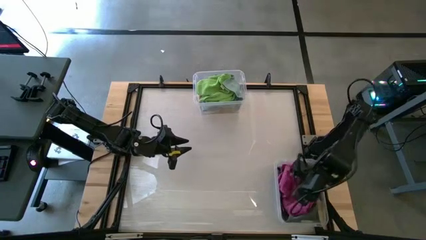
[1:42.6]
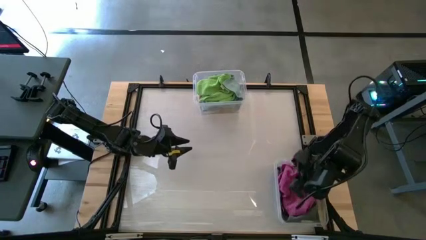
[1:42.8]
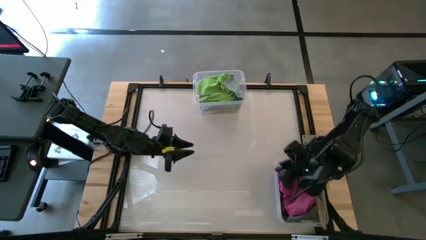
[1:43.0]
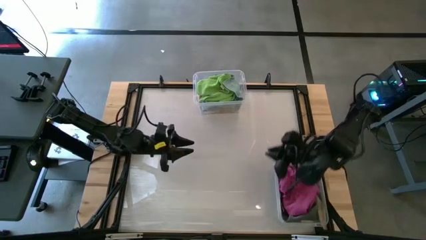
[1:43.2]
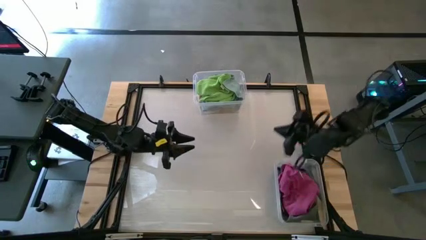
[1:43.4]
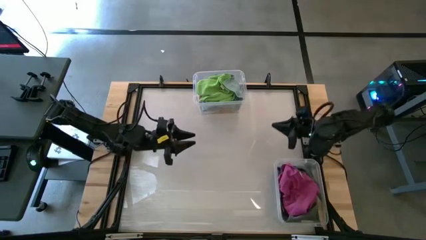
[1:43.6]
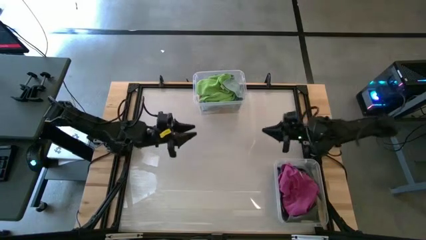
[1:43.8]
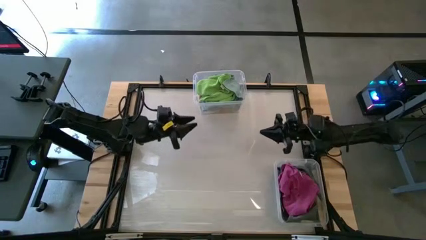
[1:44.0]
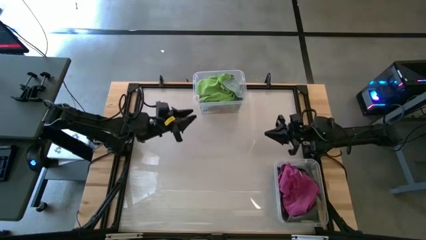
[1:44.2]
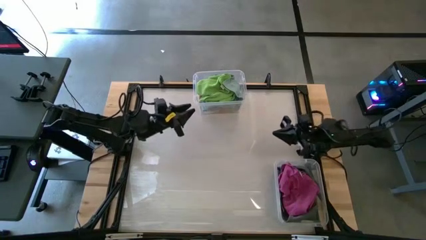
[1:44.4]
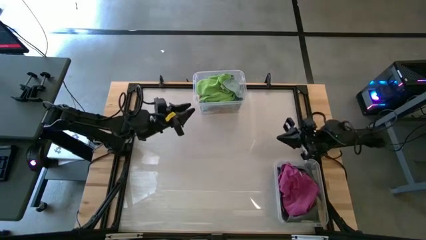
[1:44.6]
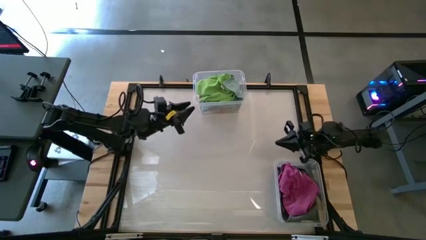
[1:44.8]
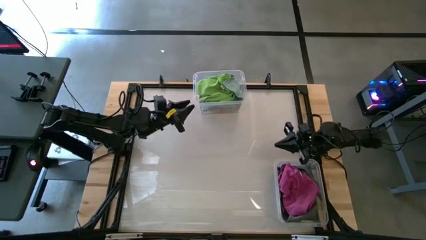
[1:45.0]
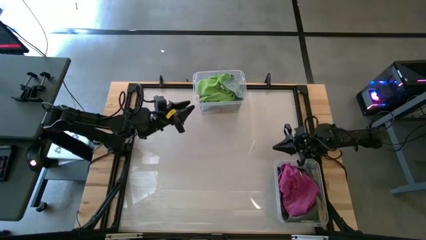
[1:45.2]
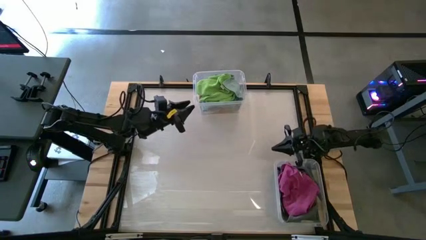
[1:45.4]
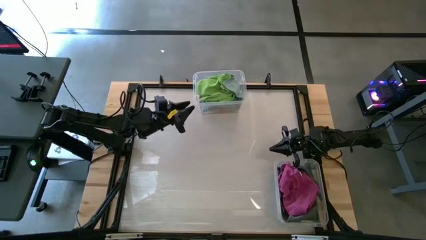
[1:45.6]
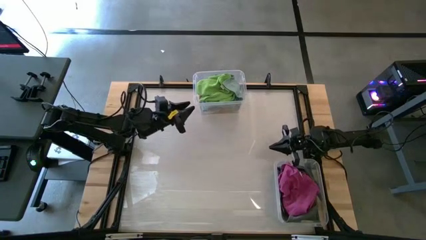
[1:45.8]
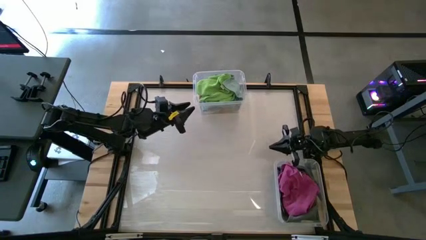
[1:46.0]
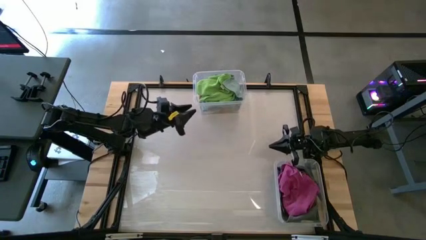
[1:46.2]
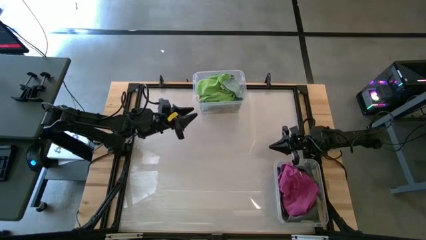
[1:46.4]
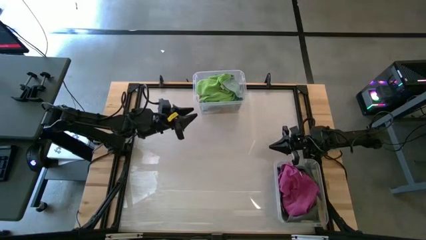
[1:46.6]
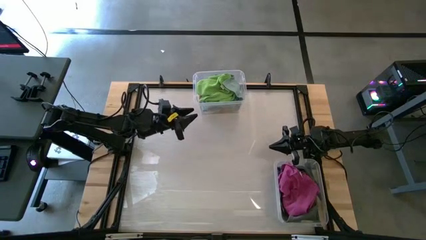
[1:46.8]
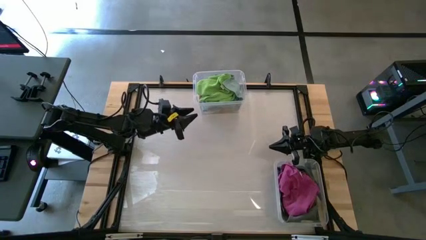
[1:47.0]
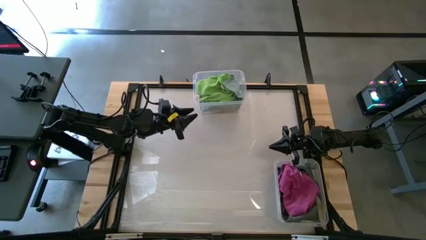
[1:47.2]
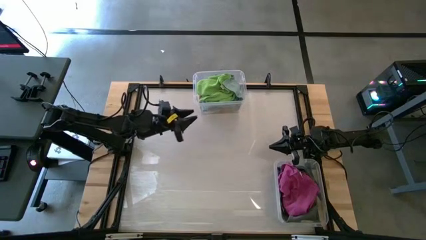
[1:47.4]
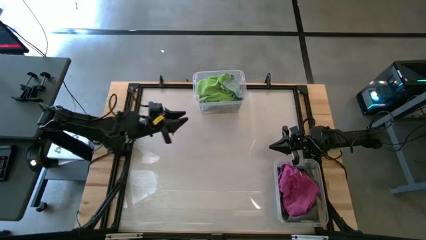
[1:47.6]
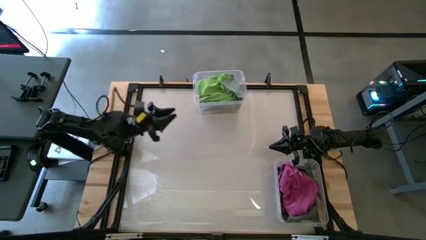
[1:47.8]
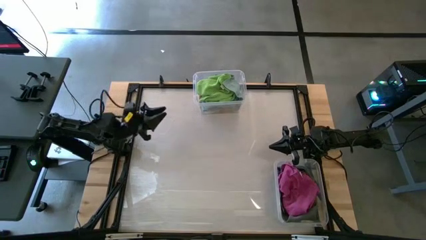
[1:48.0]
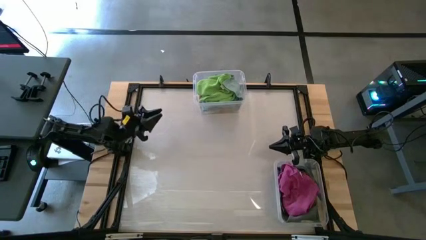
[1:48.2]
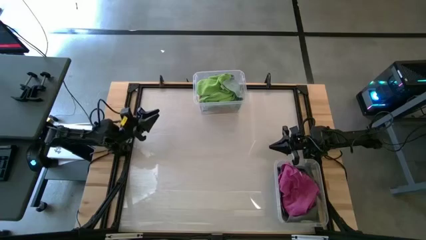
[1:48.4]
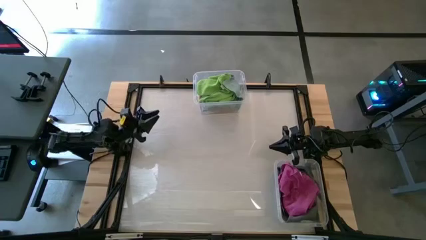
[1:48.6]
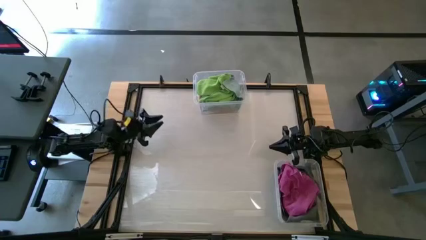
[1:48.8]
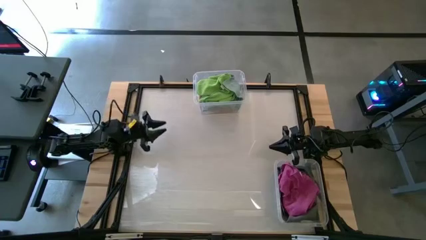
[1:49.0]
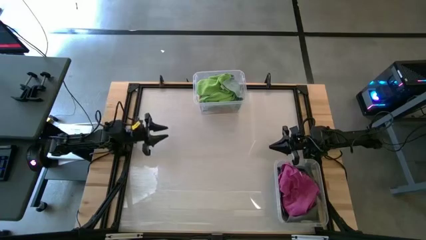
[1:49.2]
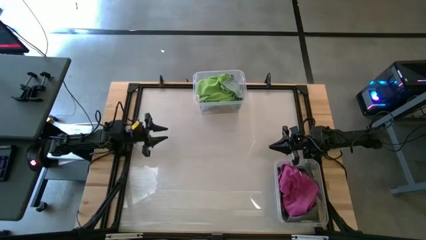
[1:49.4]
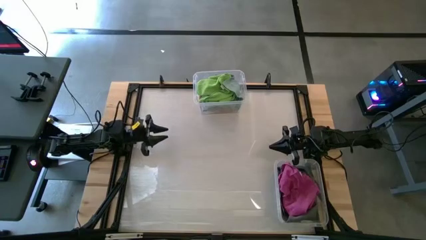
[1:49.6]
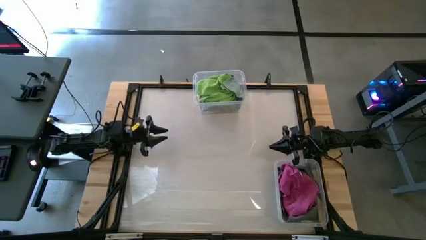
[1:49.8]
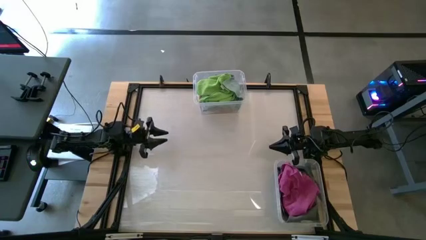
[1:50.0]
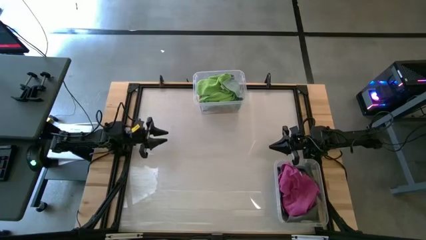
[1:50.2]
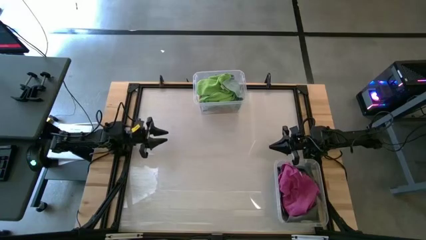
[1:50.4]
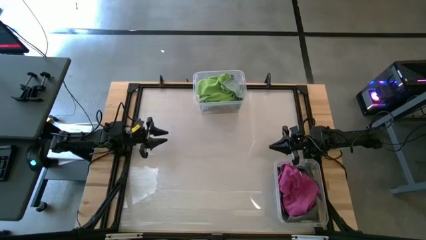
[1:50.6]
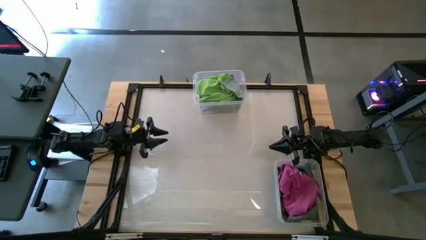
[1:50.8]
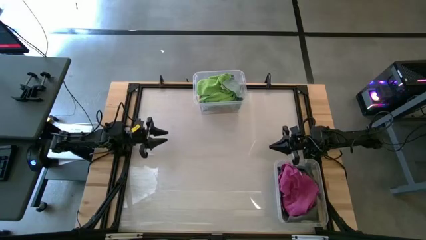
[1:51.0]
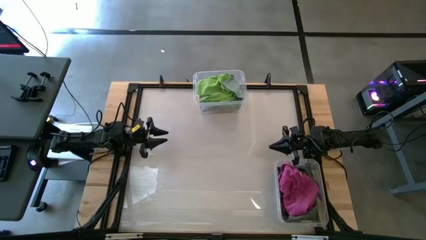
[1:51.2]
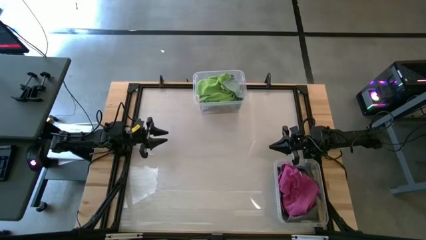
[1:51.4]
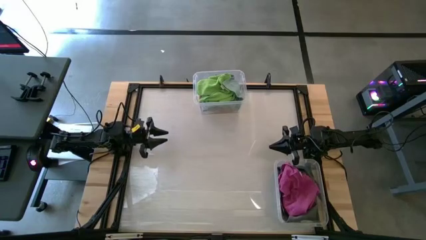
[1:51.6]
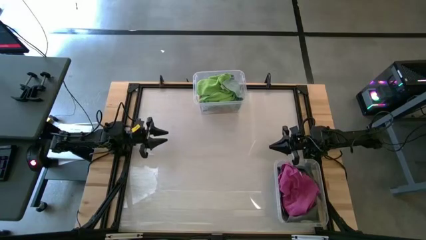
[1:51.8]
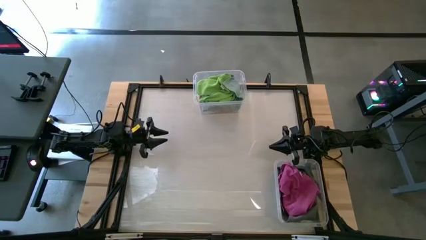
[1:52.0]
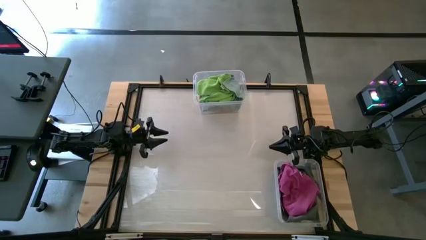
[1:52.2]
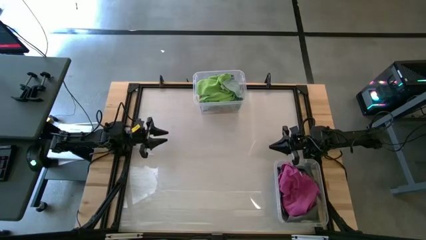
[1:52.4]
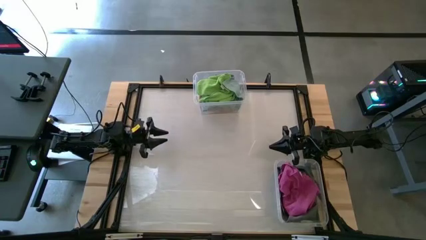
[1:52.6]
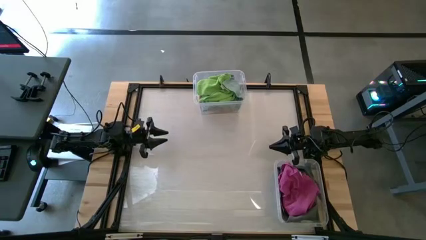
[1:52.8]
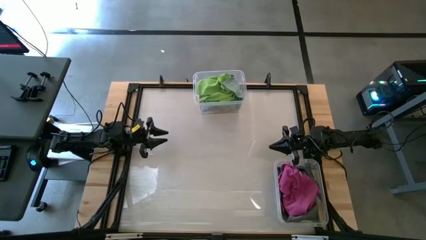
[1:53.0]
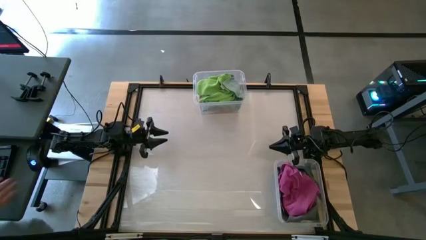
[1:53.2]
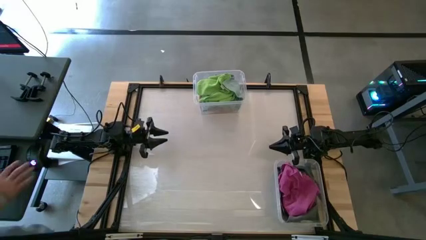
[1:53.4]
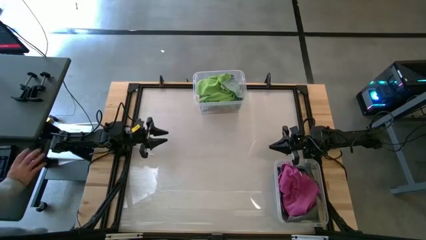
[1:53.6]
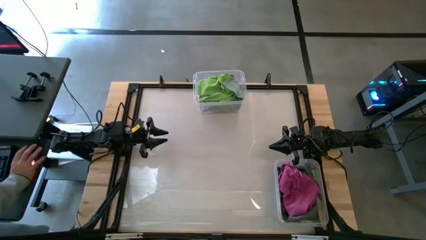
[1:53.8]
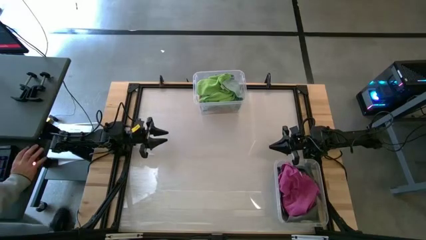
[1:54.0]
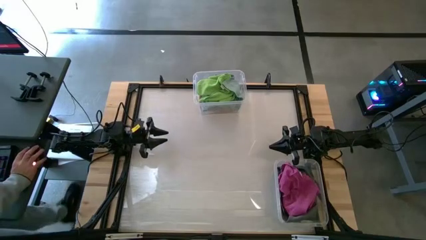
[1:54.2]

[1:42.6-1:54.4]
Task: Sort towels by color in basket
Return to Home Position
